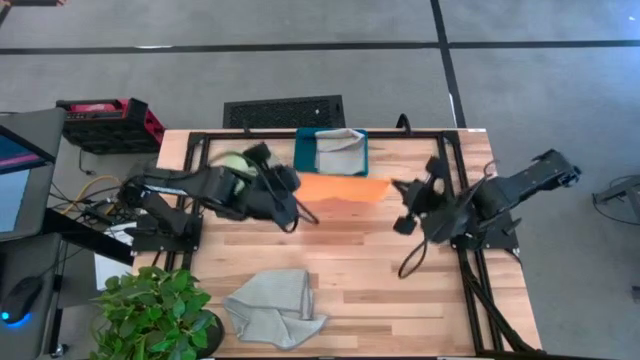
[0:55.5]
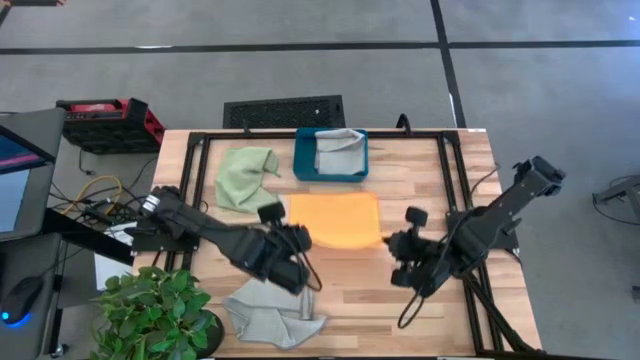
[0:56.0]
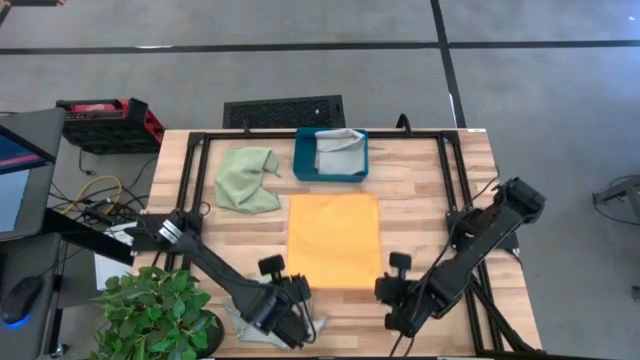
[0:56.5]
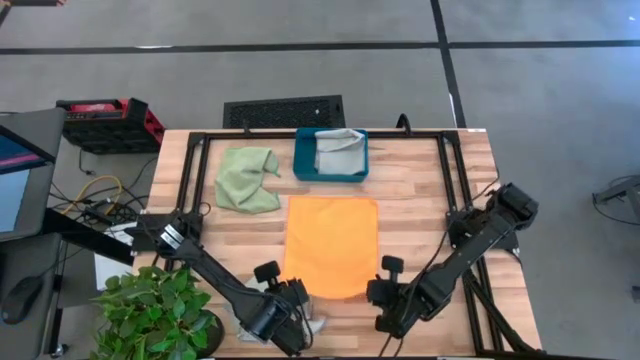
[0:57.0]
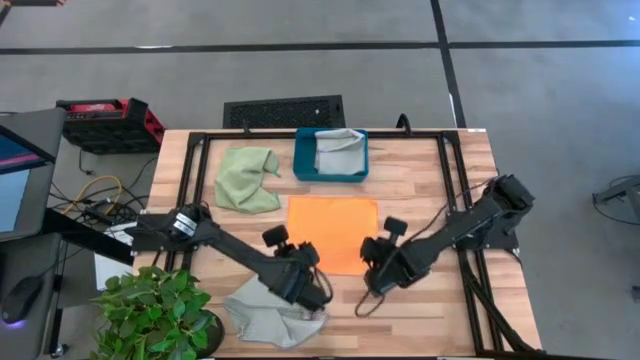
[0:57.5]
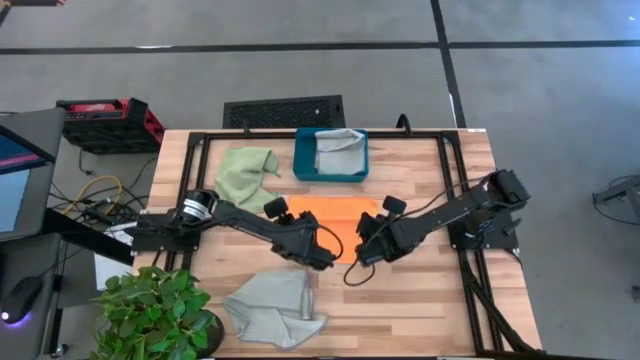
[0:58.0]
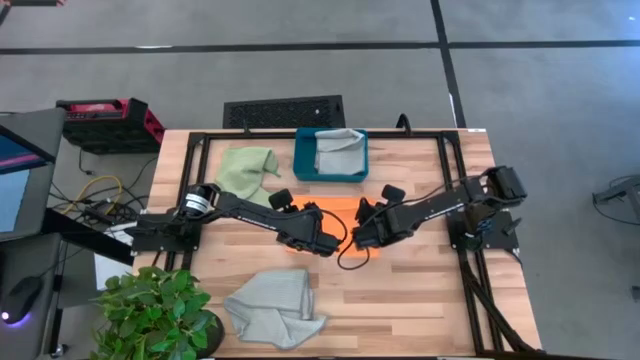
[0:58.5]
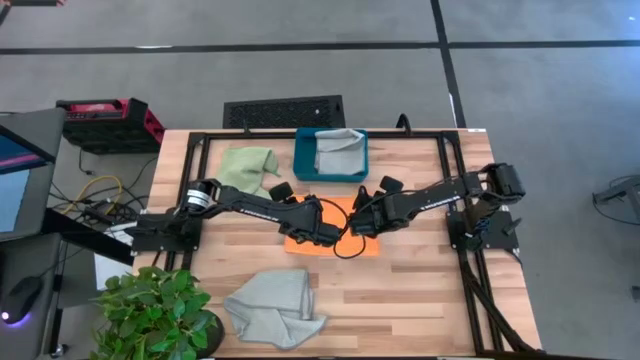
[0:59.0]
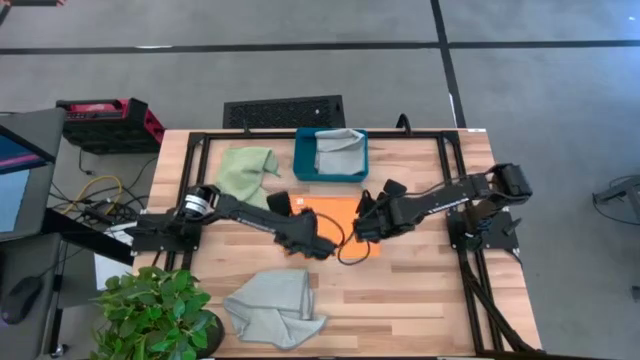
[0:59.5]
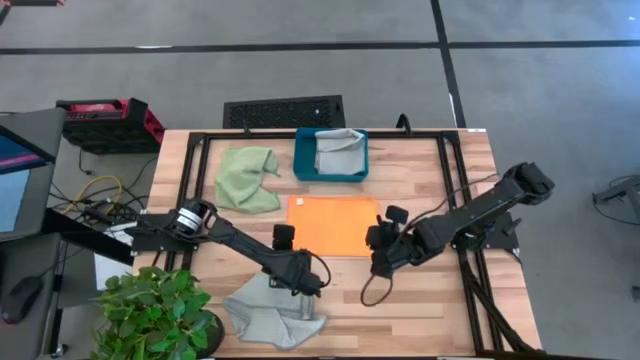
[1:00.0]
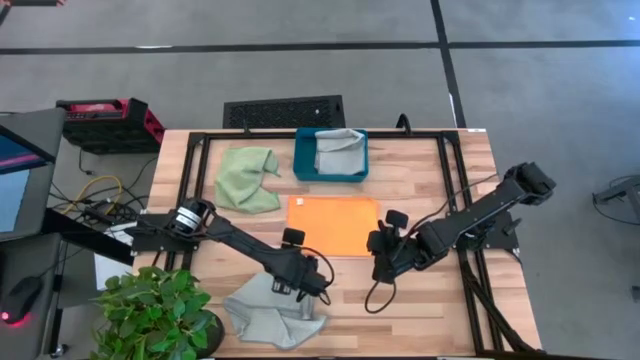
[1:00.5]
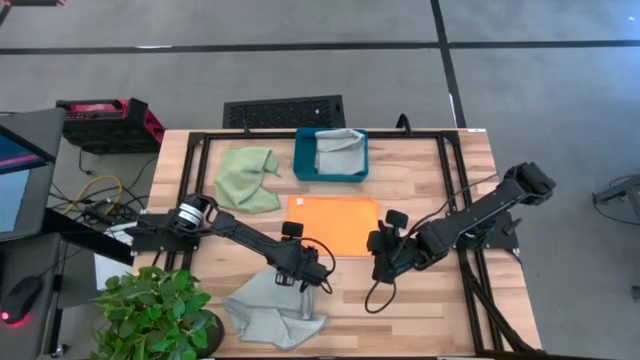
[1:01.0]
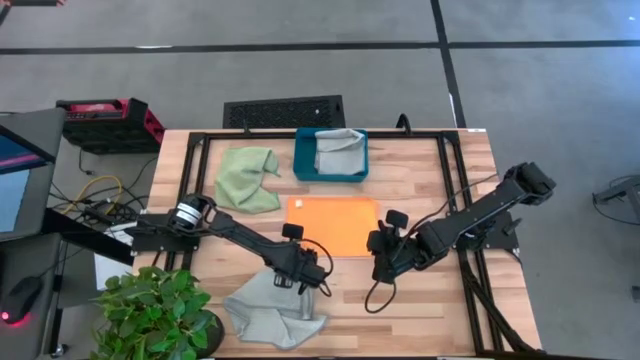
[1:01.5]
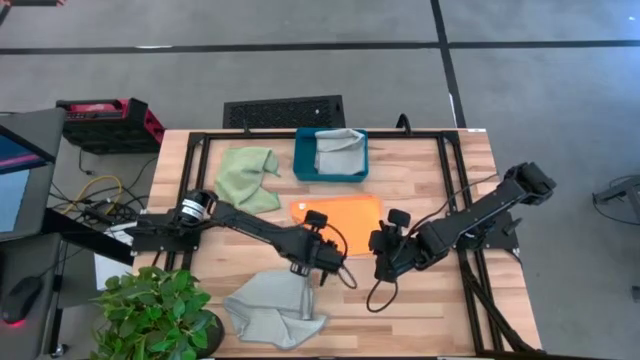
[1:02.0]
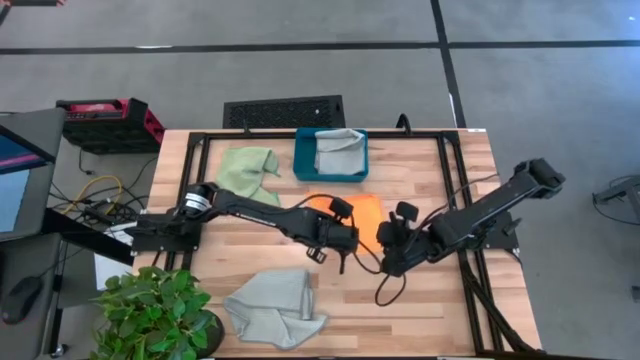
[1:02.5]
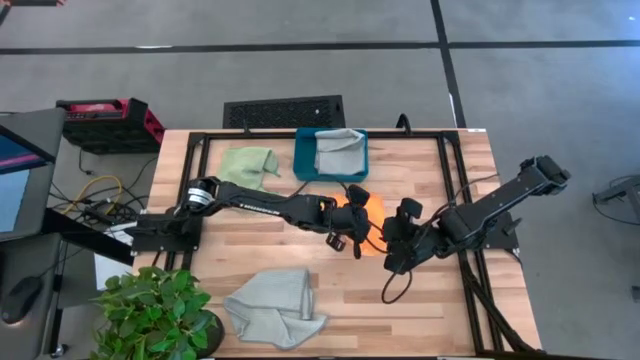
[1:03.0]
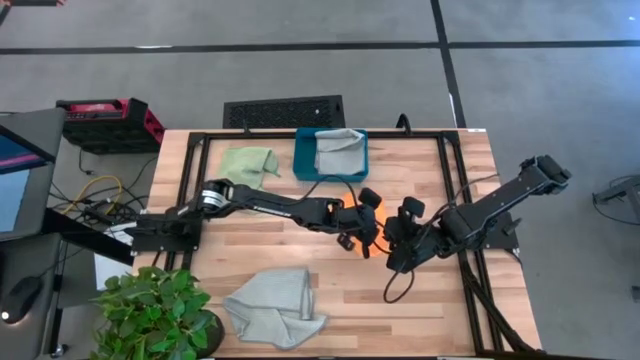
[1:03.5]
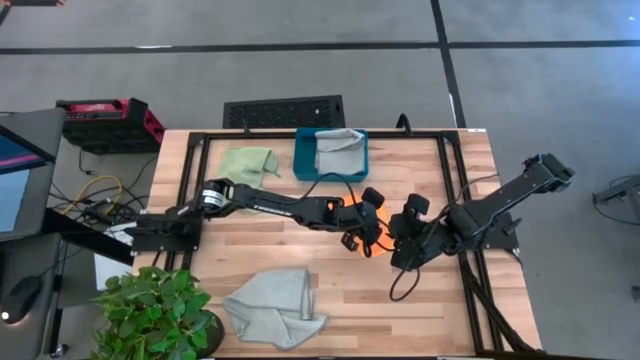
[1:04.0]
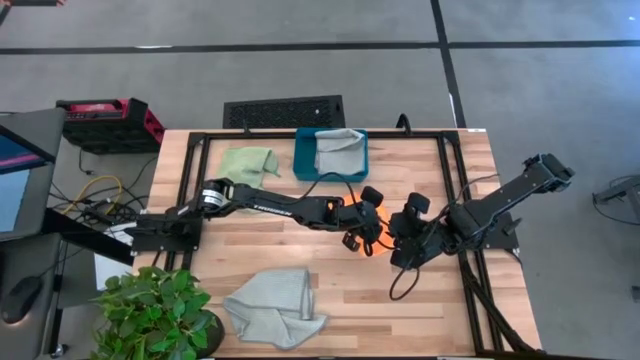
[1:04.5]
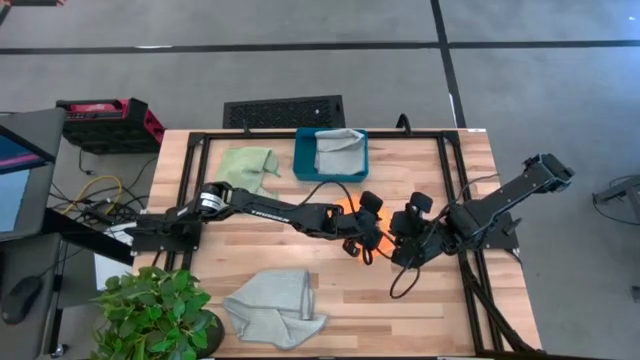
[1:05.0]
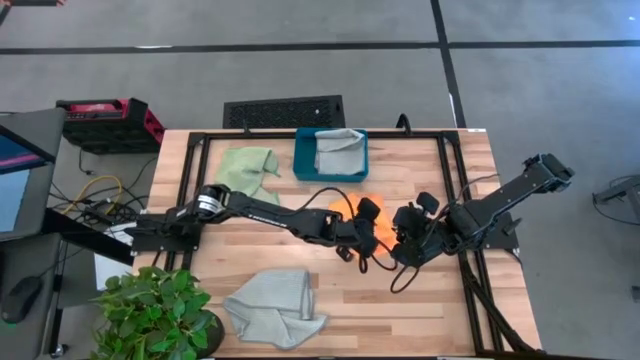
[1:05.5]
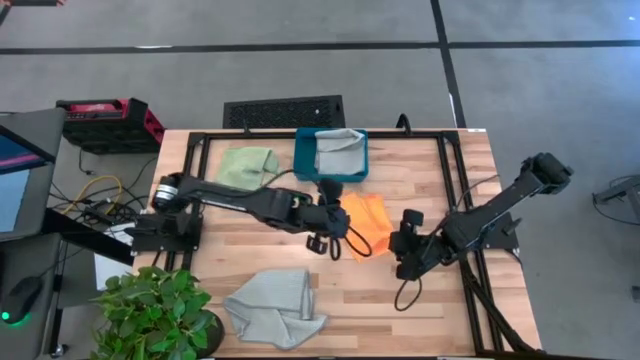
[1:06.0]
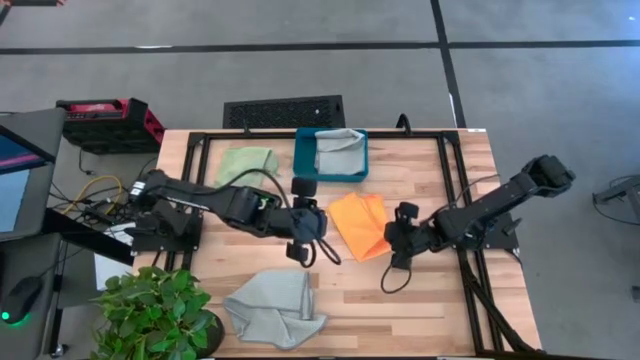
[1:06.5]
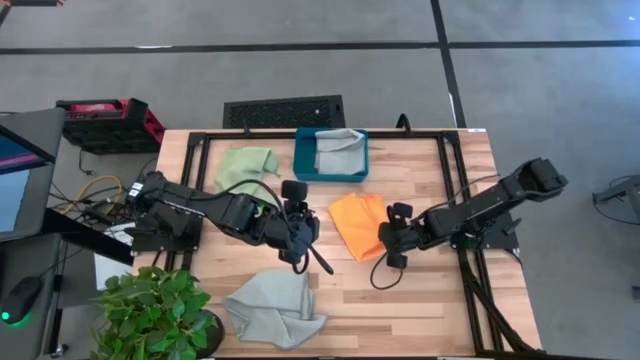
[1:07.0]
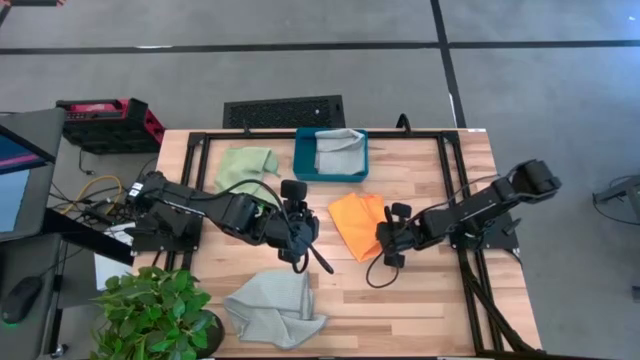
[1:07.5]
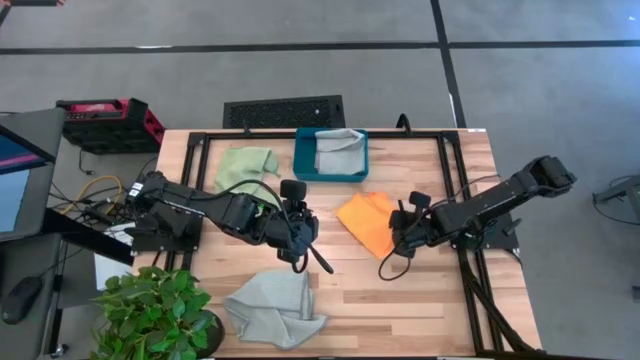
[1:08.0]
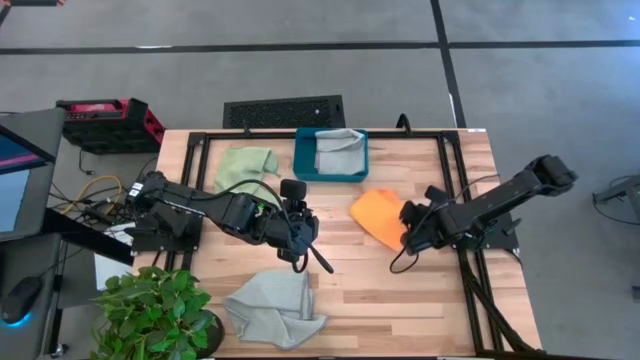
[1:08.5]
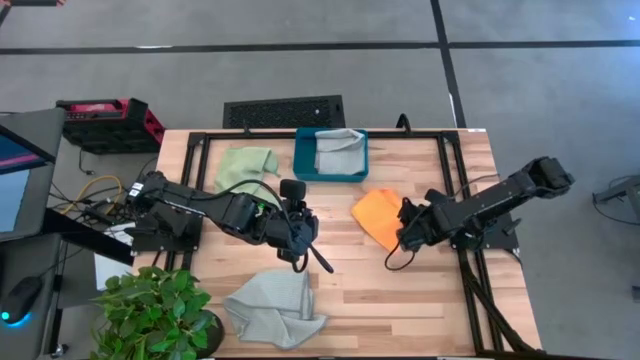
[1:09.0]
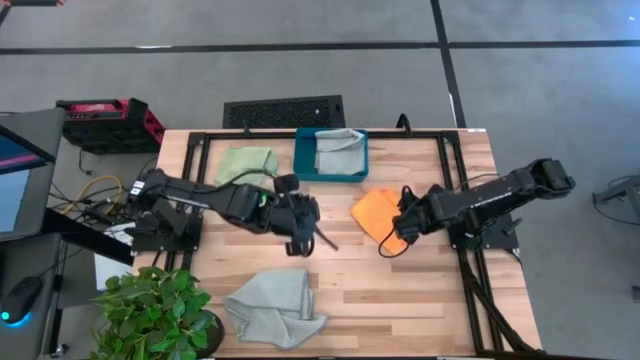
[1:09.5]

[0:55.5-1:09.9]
Task: Fold microfiber towels
Fold the orange towel

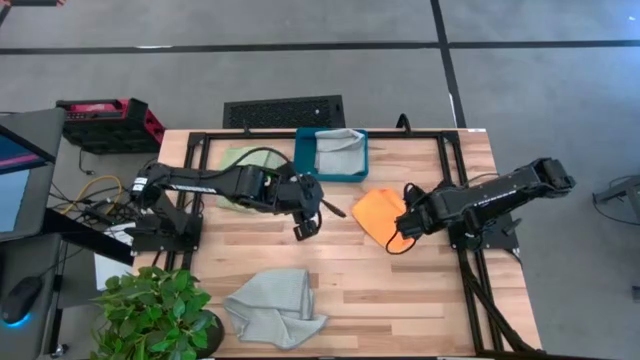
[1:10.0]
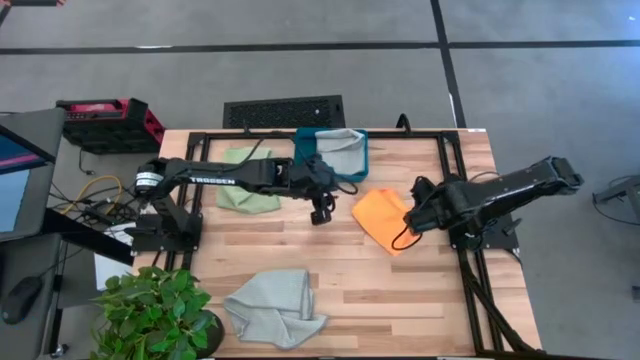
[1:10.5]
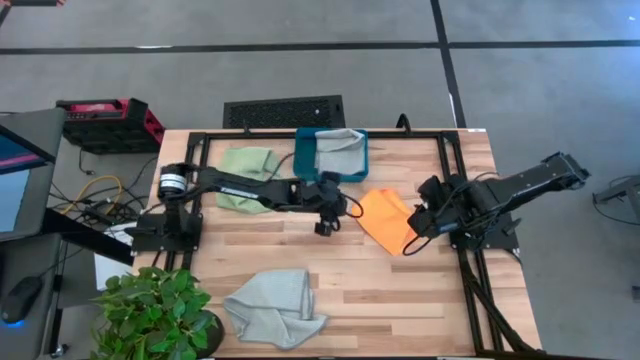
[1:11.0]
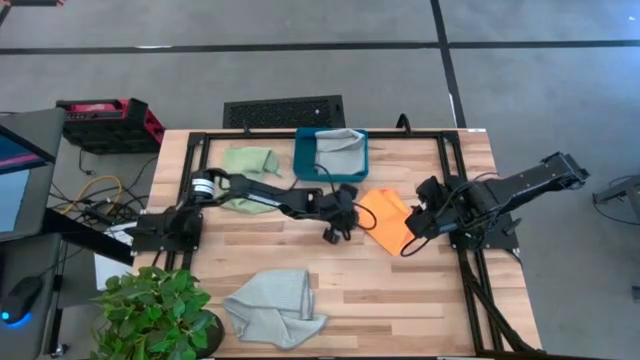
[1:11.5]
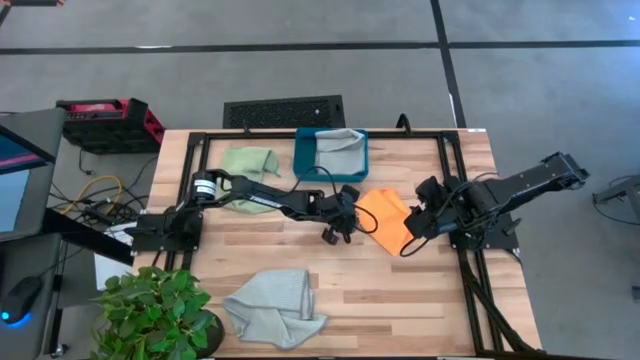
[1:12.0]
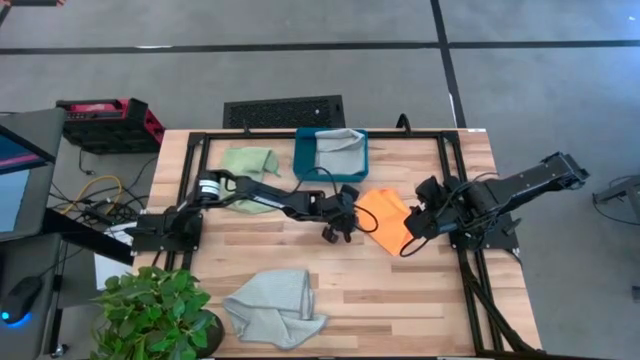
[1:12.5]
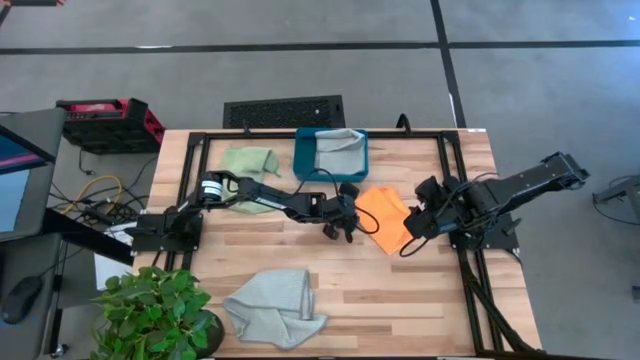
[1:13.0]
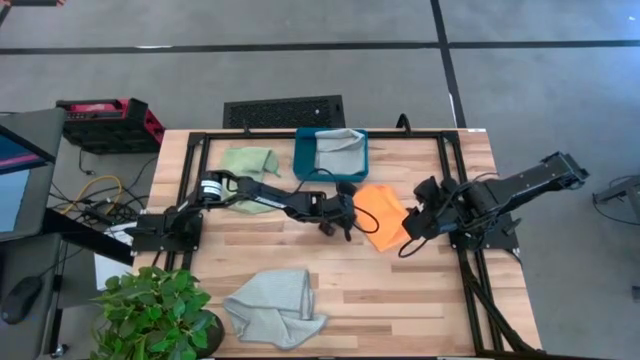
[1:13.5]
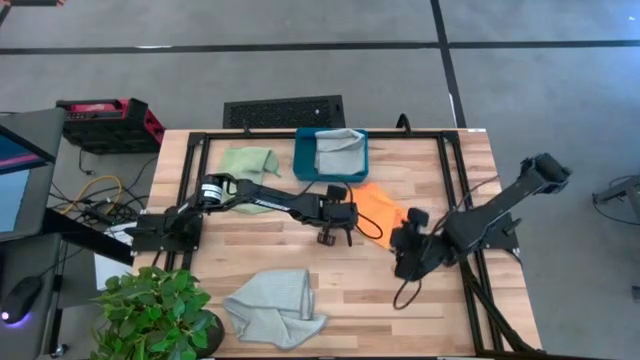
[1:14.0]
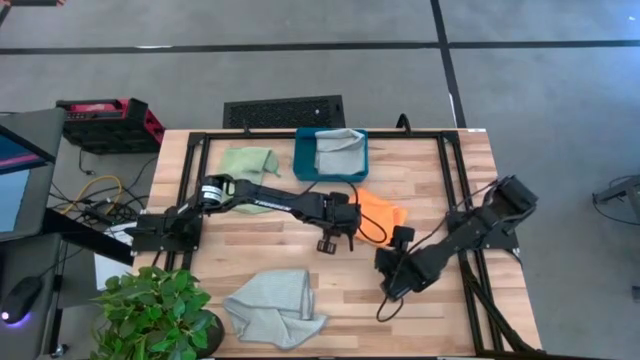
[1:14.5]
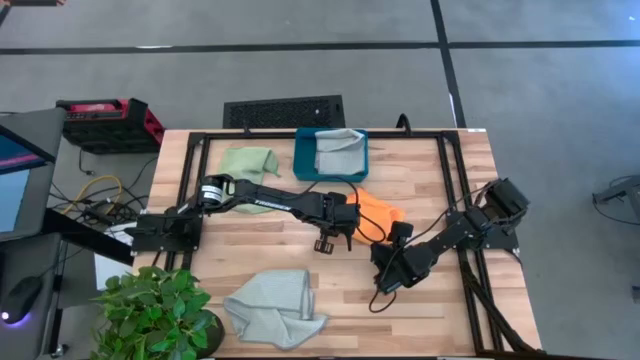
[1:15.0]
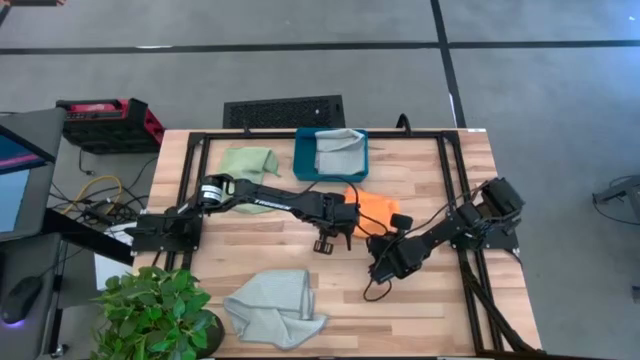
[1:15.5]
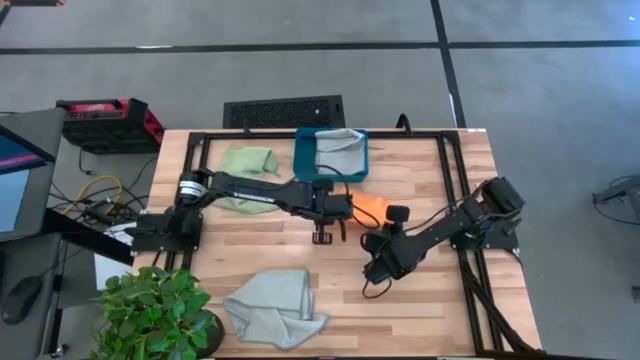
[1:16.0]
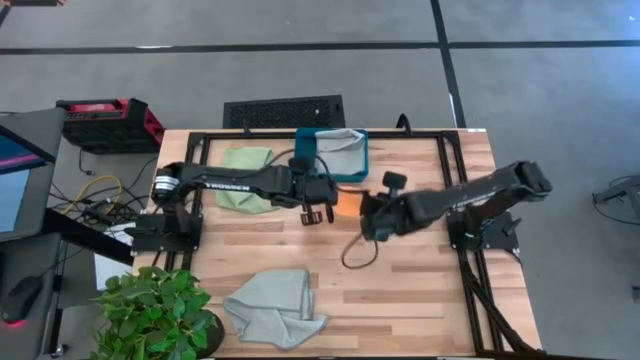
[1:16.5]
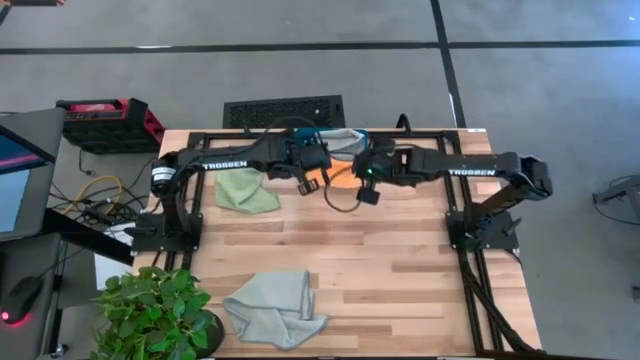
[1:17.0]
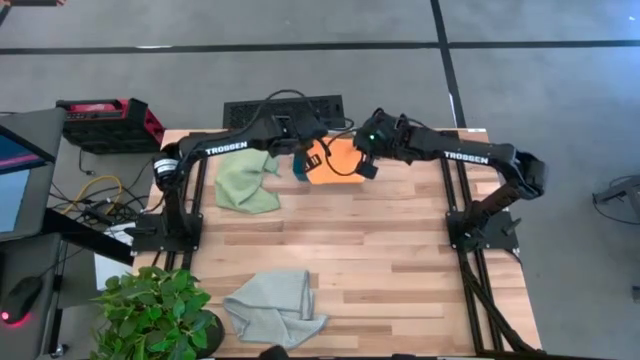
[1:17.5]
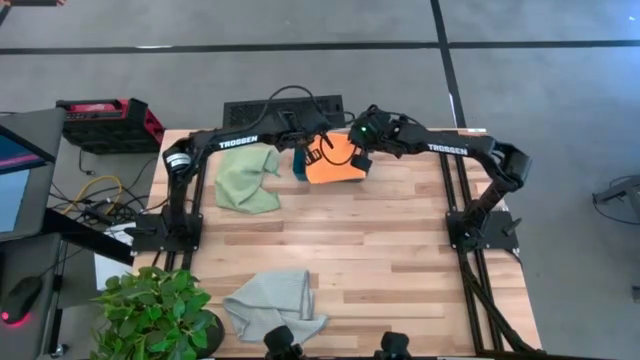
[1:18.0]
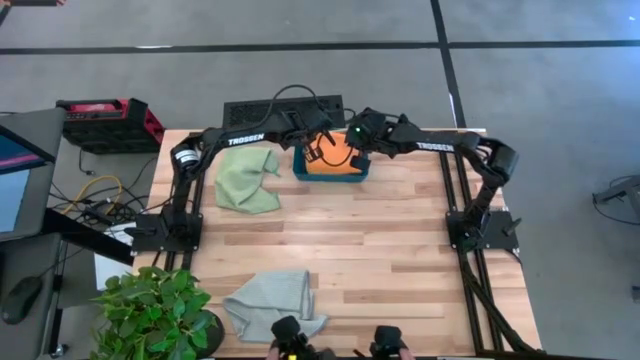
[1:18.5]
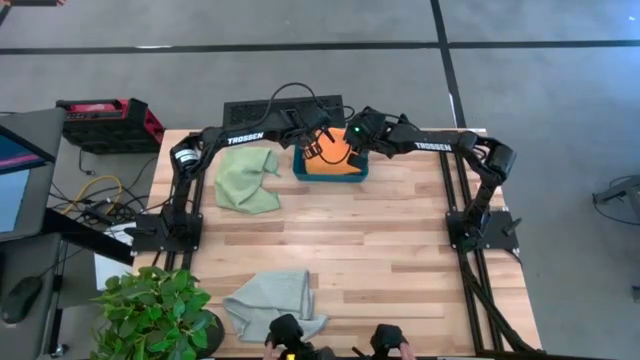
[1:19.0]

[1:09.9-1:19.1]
Put the folded orange towel into the blue bin
